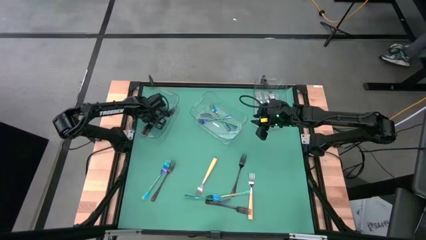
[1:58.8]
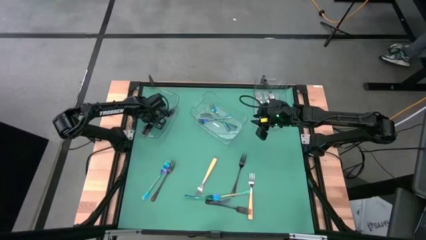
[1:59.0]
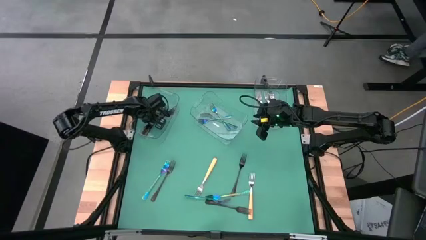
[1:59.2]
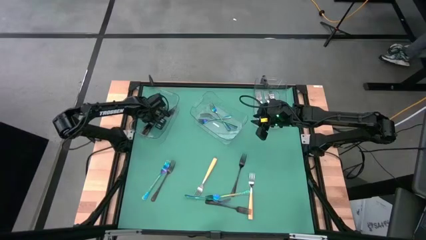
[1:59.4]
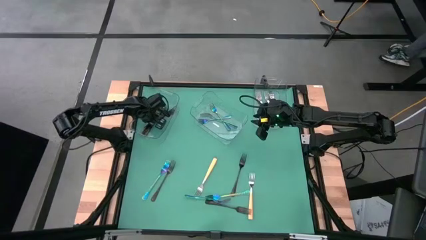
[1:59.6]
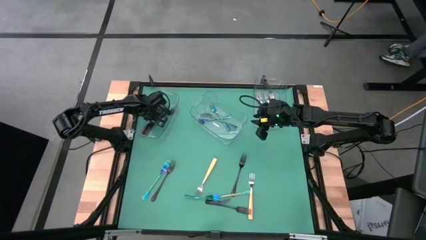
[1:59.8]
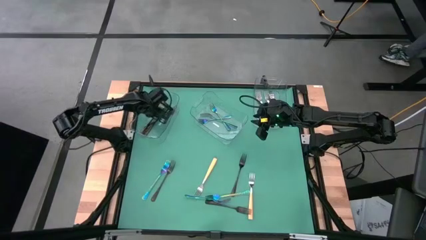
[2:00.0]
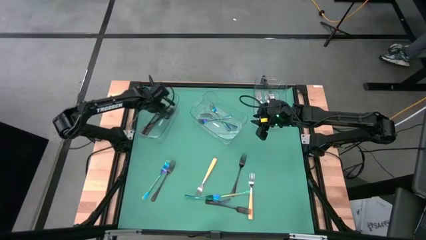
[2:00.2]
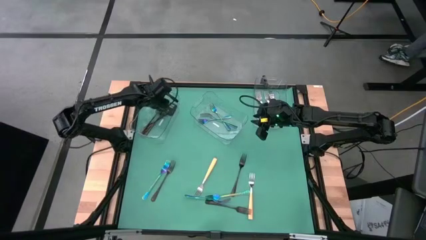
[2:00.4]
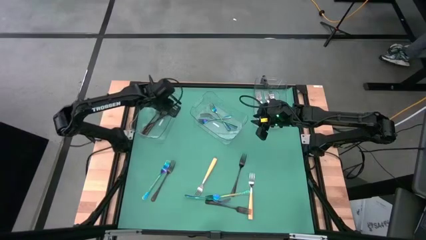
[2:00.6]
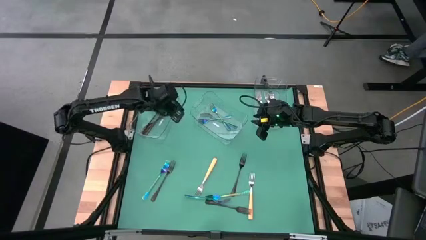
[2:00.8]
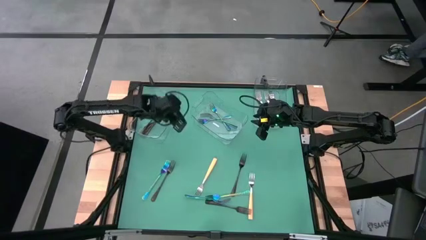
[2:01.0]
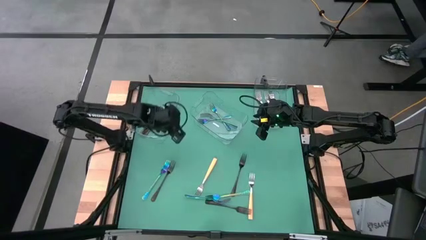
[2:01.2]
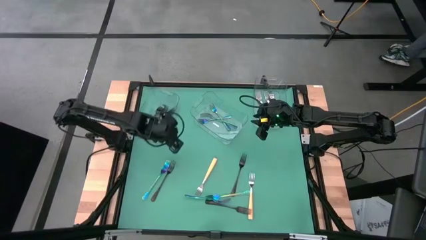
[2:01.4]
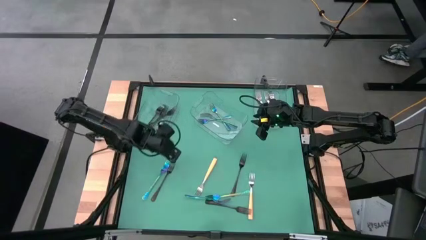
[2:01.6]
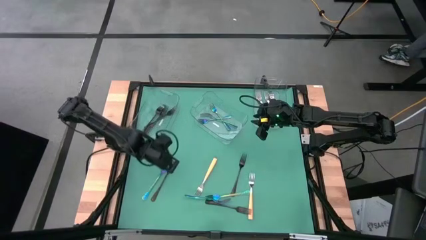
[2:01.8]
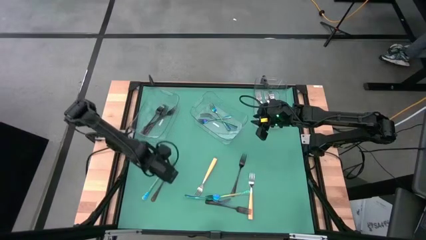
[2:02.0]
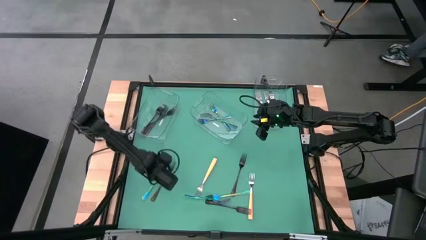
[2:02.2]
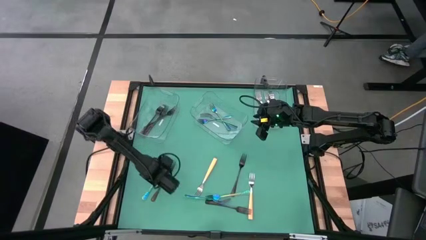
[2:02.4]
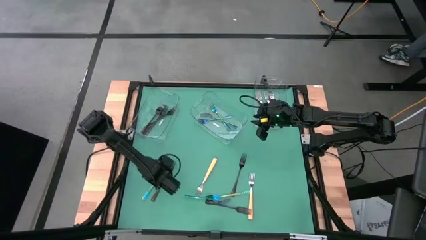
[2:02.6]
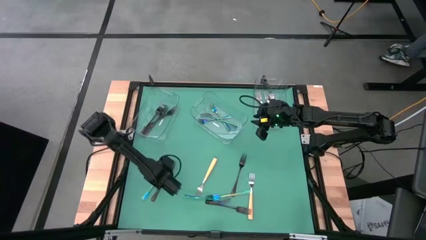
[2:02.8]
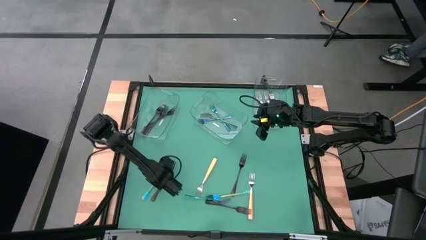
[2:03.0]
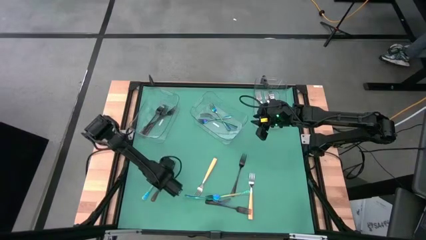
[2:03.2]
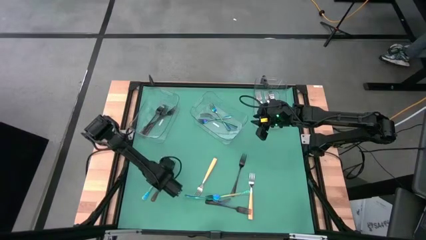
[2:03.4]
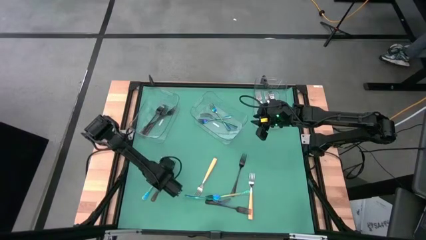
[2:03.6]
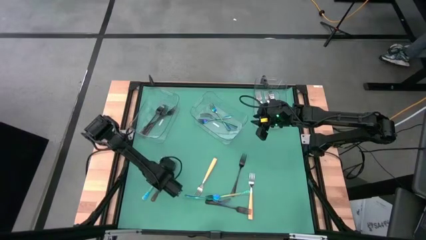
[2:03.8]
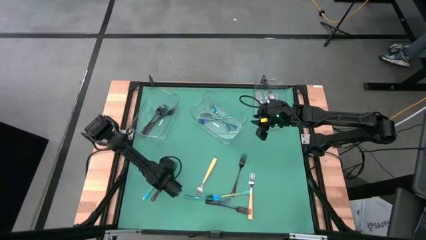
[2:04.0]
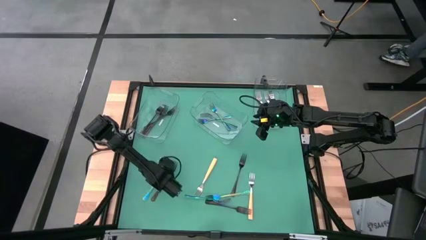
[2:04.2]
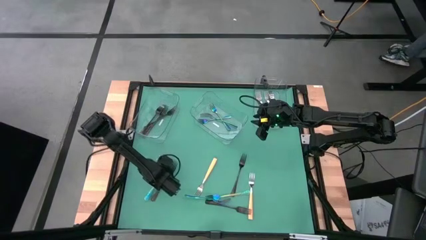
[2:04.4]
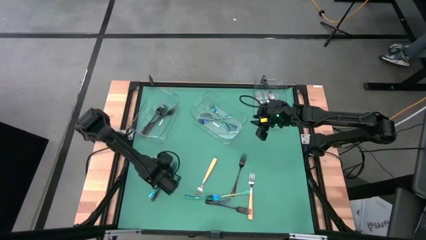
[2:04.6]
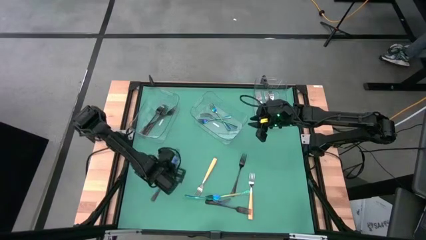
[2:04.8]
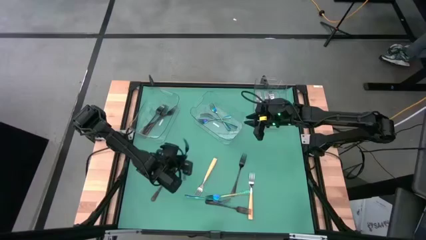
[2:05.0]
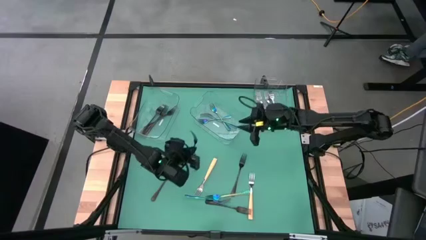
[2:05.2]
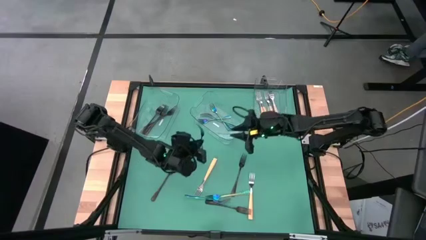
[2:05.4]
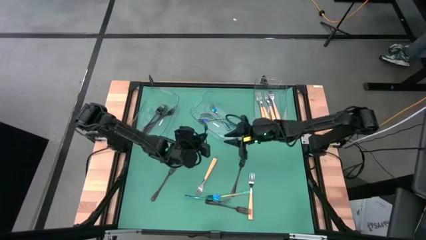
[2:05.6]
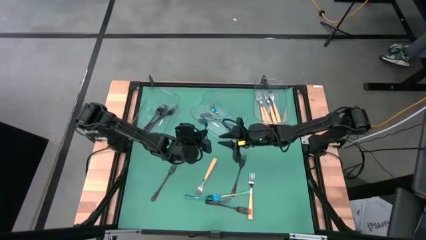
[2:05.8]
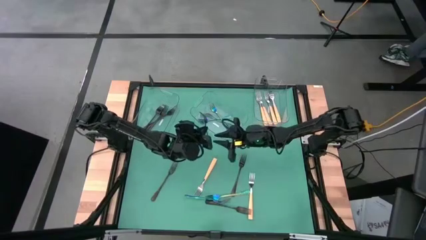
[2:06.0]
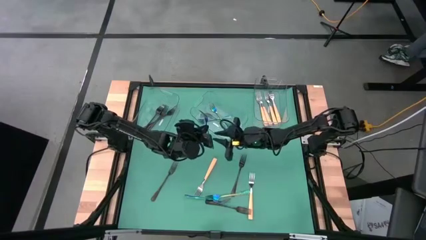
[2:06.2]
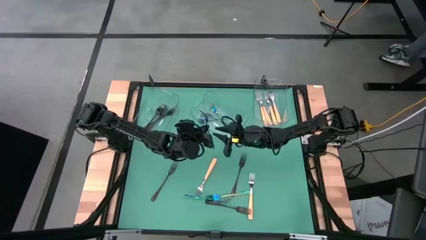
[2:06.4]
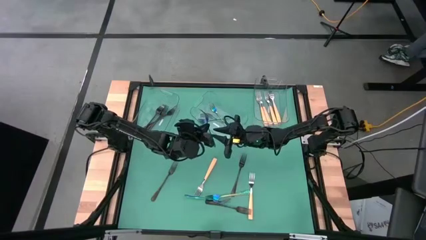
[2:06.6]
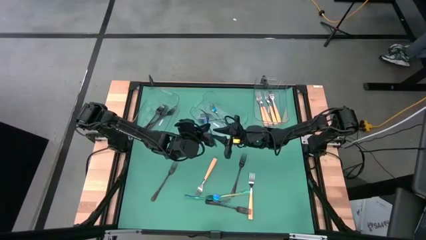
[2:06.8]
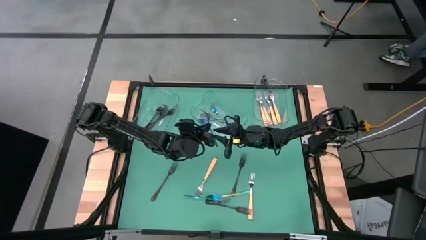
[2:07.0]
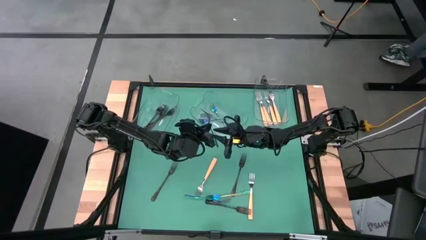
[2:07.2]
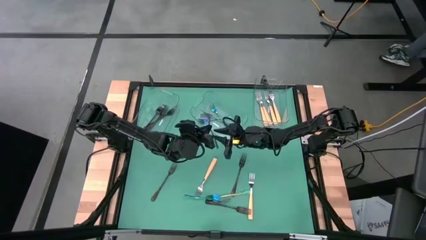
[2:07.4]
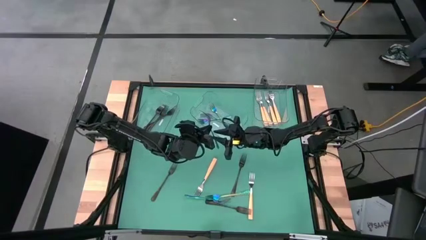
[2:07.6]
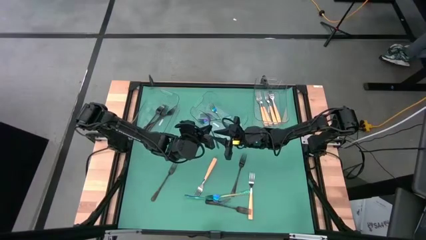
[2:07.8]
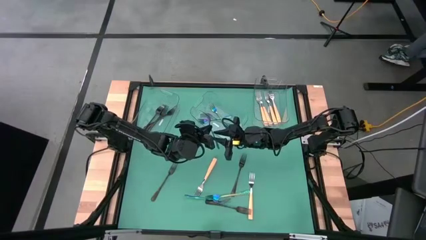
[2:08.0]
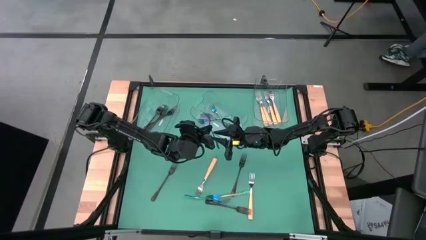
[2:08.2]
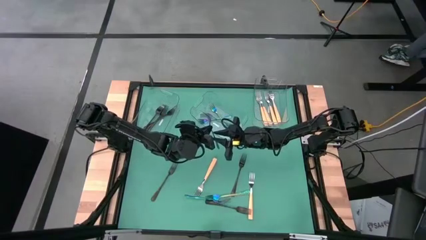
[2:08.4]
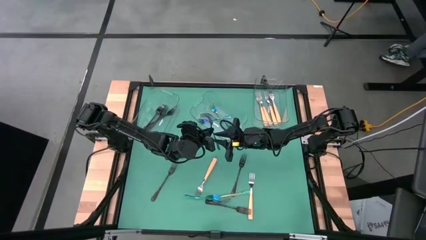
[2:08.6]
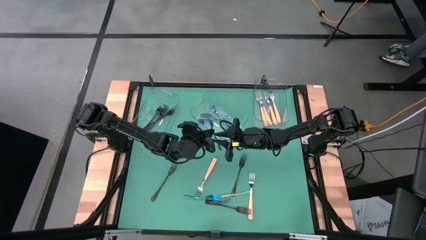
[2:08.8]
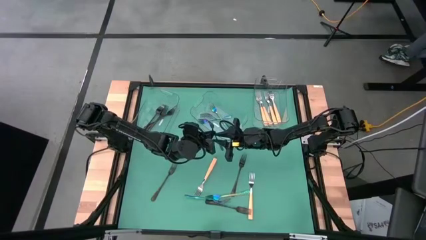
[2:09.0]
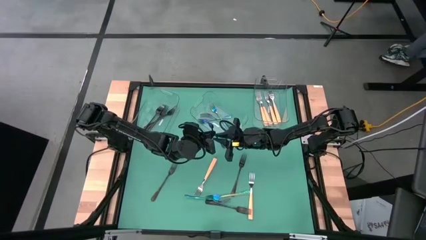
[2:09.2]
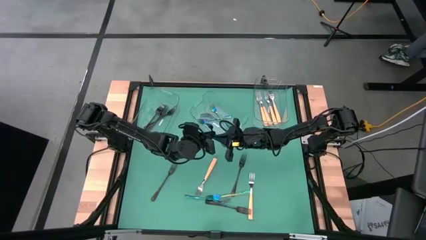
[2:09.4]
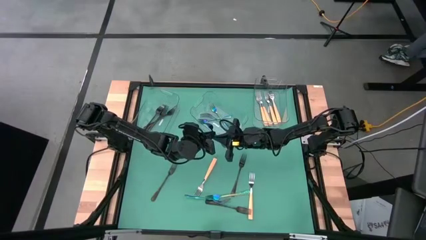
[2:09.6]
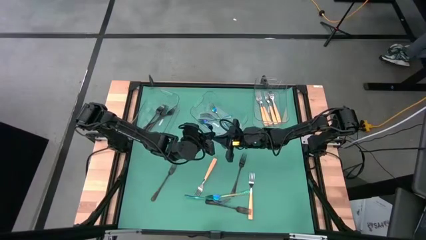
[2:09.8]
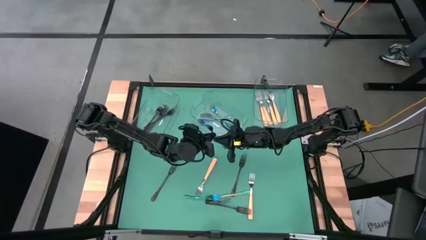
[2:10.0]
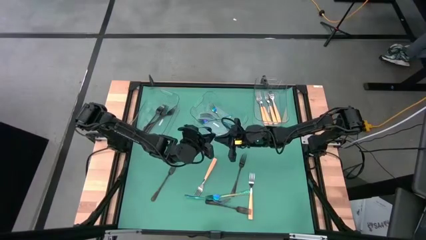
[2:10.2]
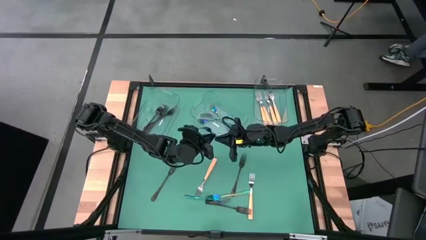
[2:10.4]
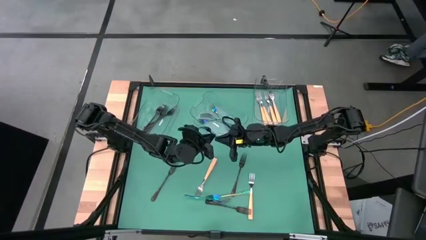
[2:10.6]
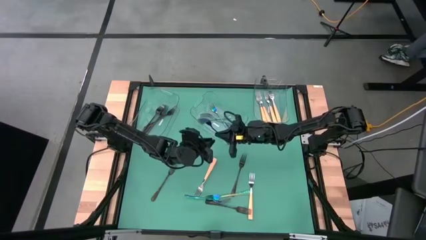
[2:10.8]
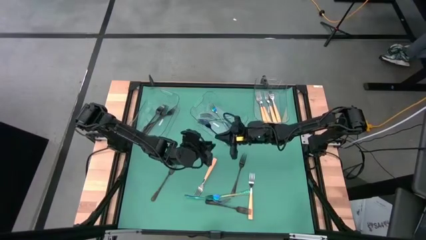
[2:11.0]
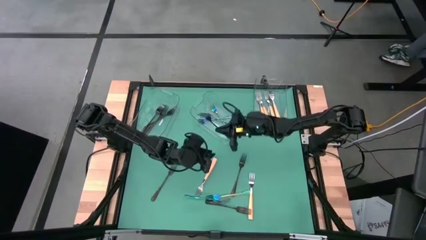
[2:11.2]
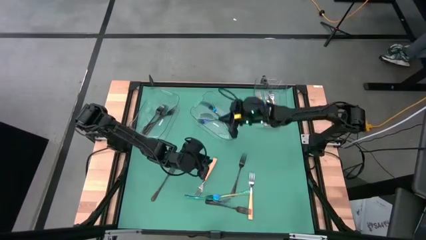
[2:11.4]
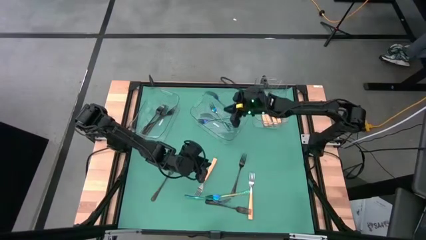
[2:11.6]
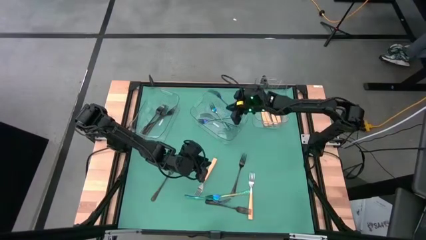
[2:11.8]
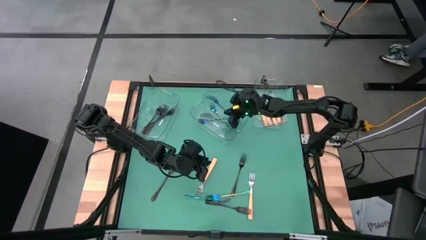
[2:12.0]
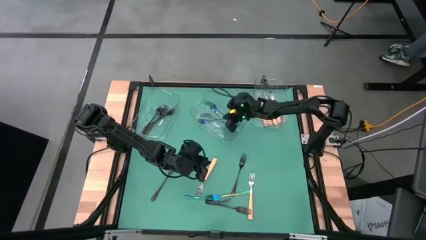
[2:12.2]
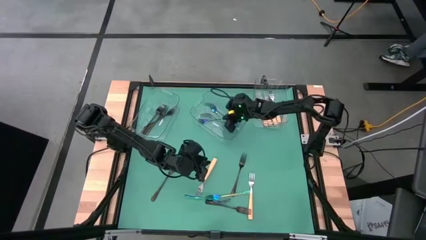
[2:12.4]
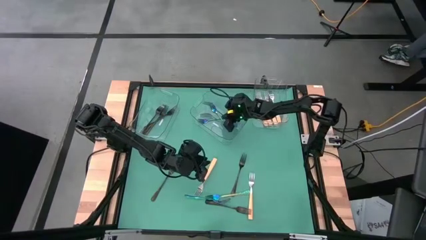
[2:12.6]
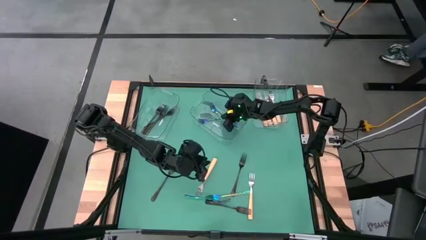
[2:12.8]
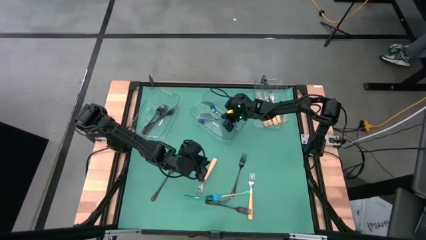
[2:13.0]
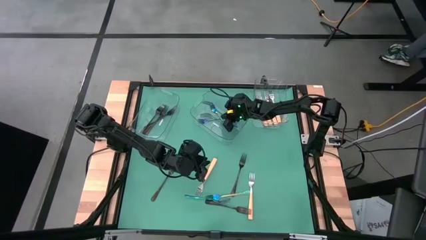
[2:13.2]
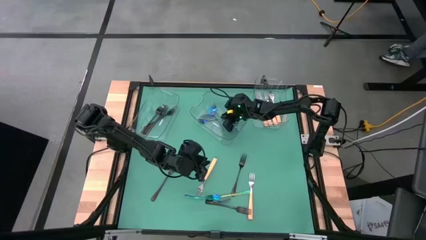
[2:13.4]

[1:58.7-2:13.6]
Task: Sort silverware by color (type)
Put the blue fork into the center transparent bin

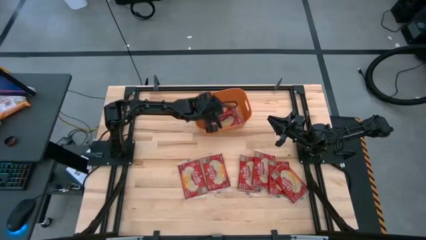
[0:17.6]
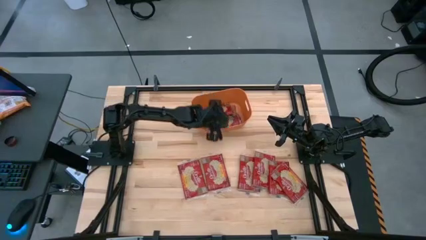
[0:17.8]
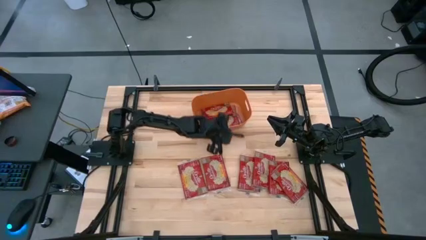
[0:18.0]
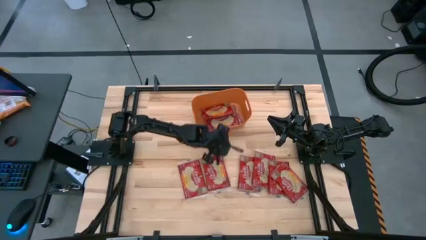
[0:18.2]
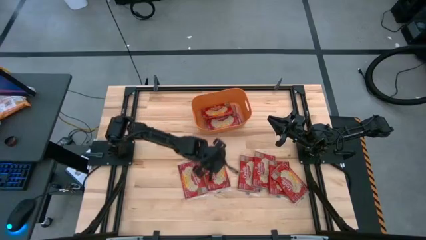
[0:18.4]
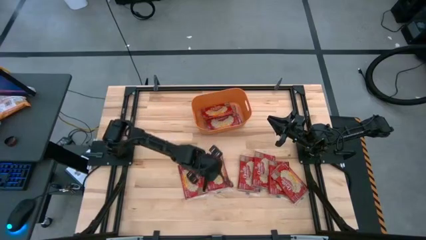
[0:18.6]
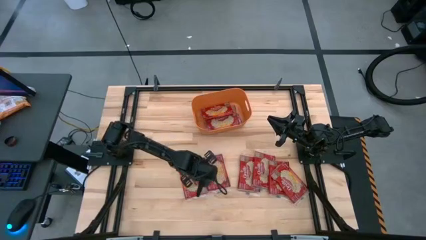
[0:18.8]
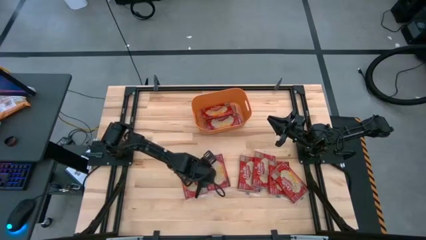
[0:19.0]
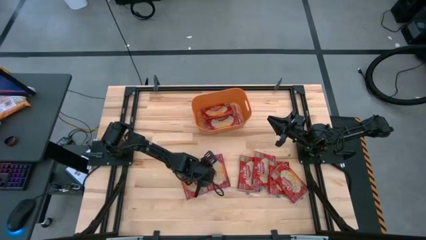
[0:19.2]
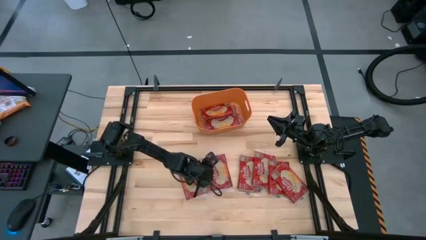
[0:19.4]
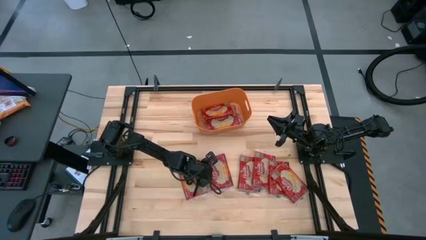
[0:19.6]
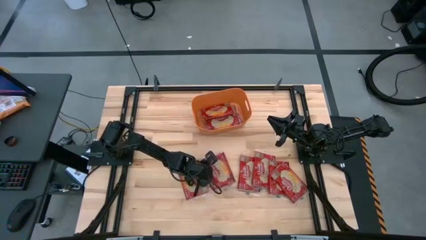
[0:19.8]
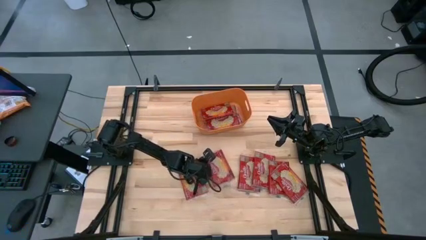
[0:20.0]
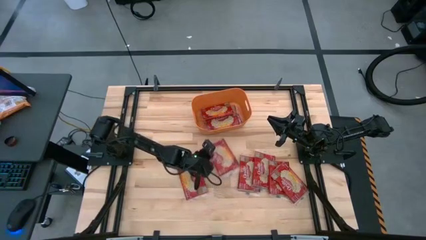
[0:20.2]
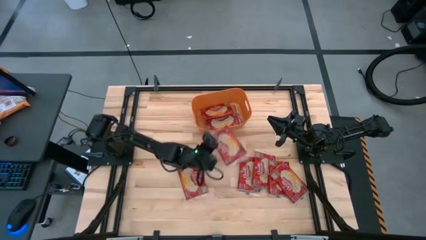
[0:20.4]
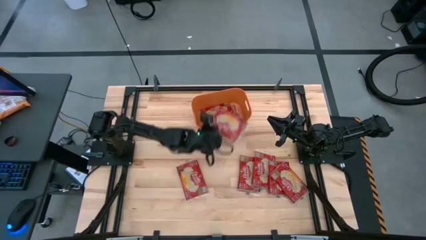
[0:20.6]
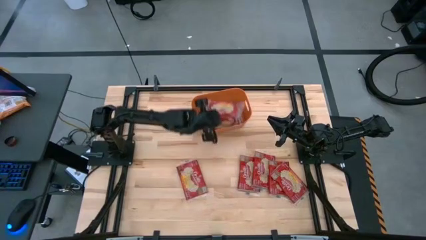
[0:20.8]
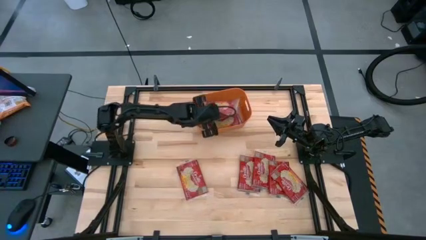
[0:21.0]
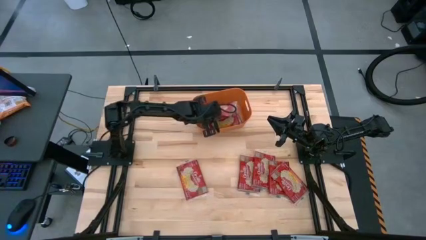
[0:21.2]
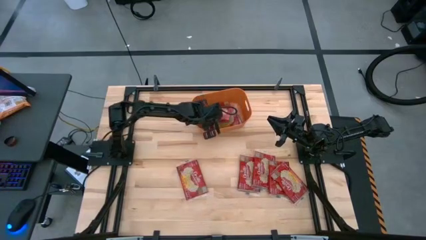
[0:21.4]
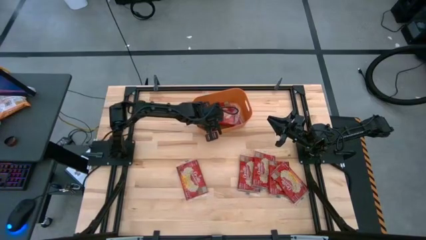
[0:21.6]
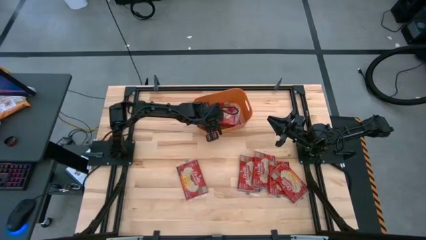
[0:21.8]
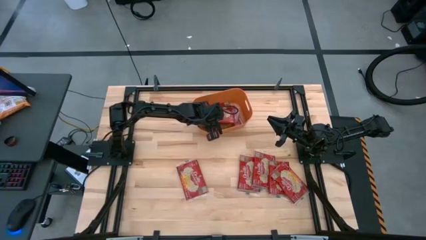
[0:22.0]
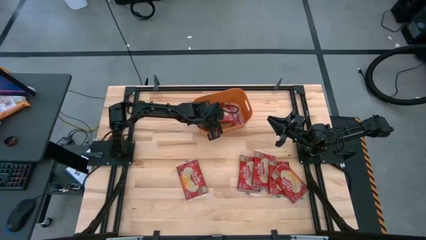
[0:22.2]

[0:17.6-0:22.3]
Task: Sort popcorn bags into baskets
Put the red popcorn bag into the orange bin
